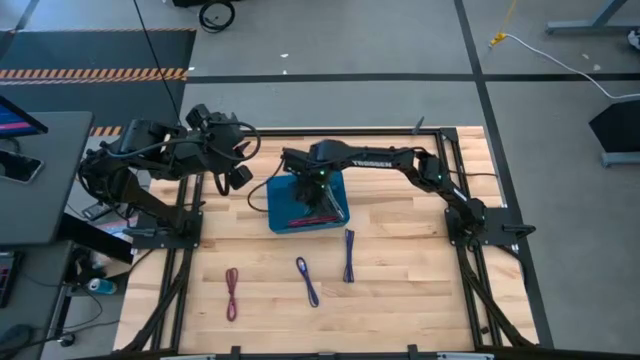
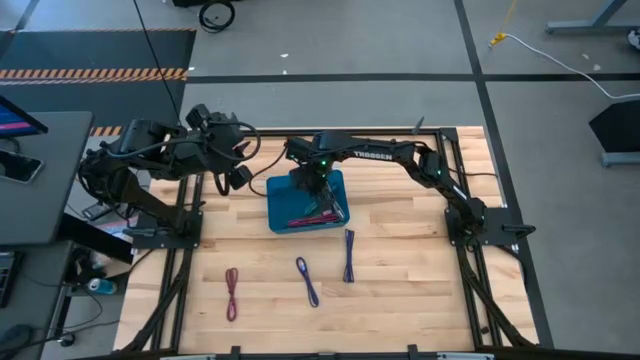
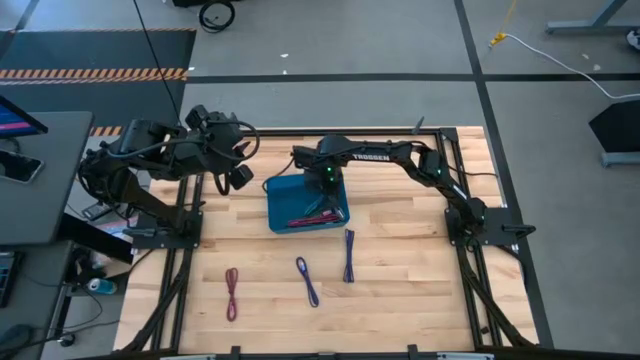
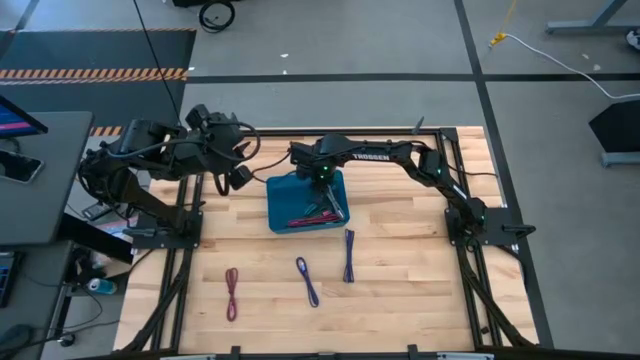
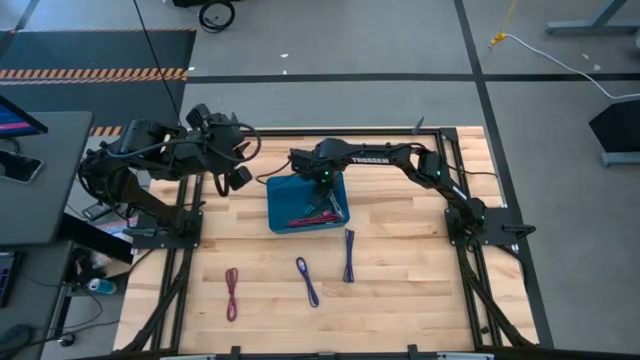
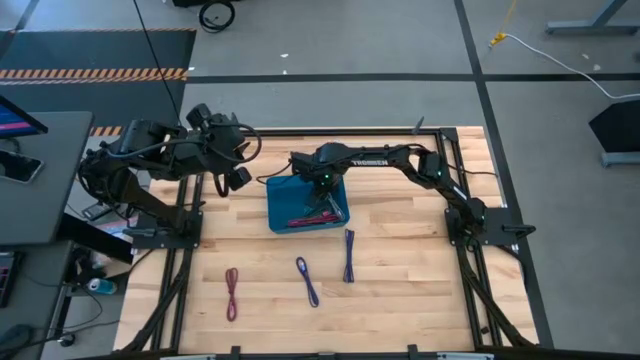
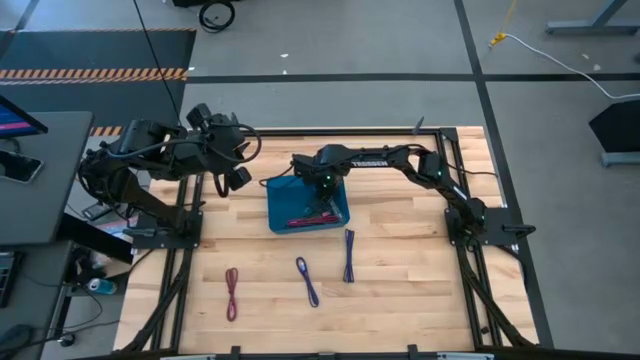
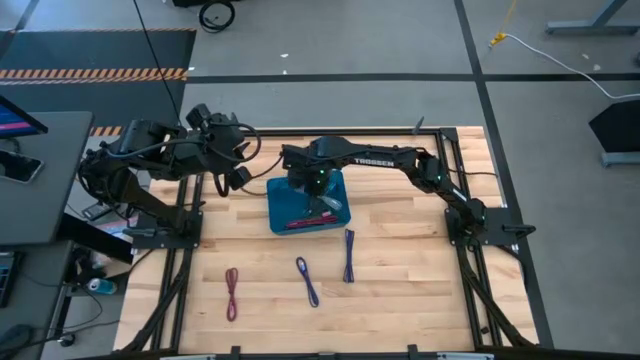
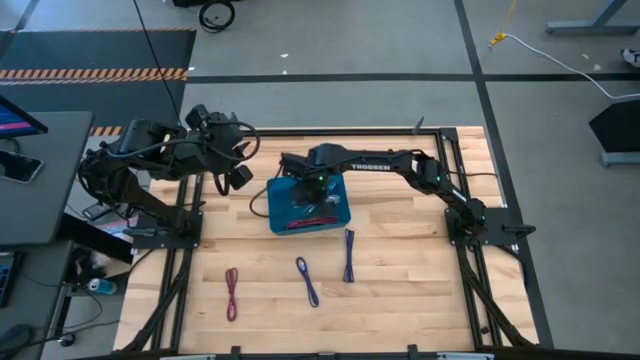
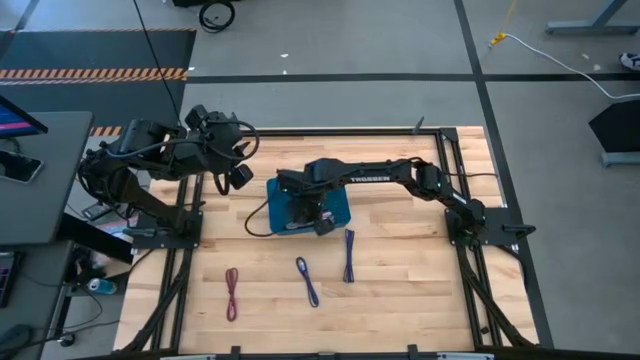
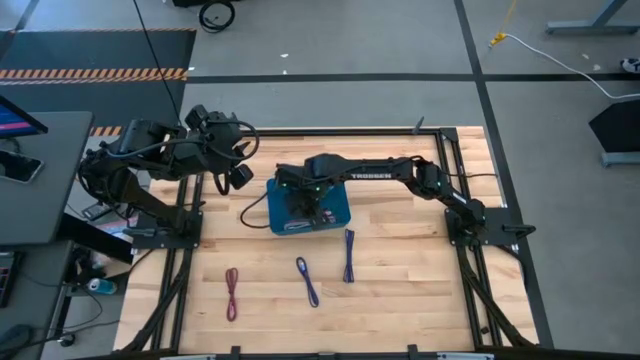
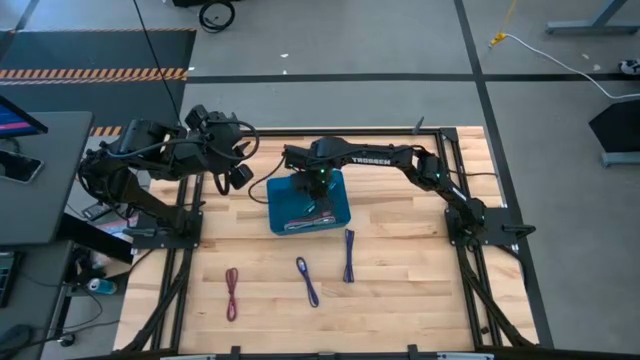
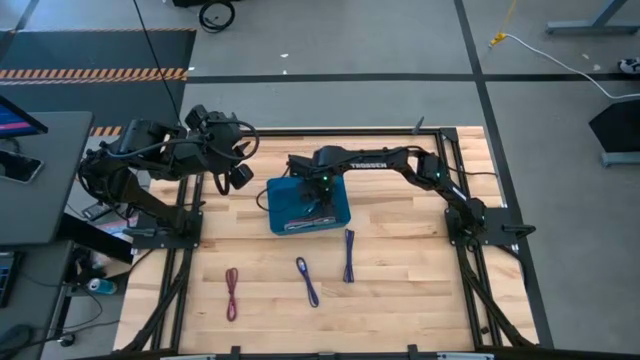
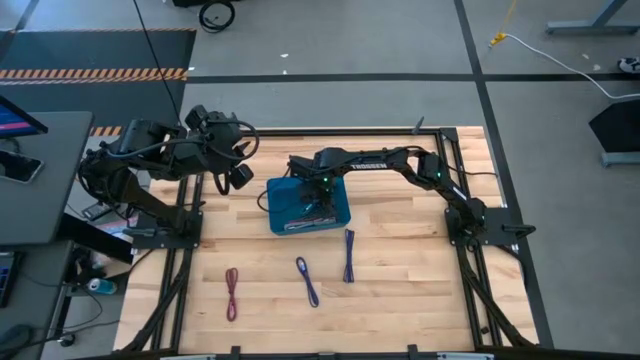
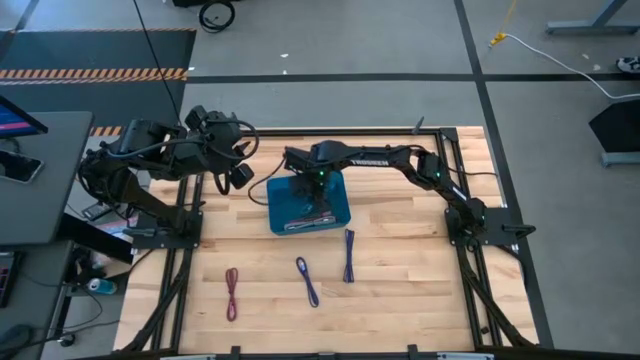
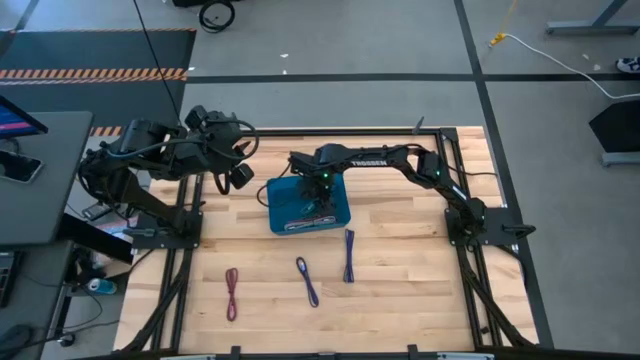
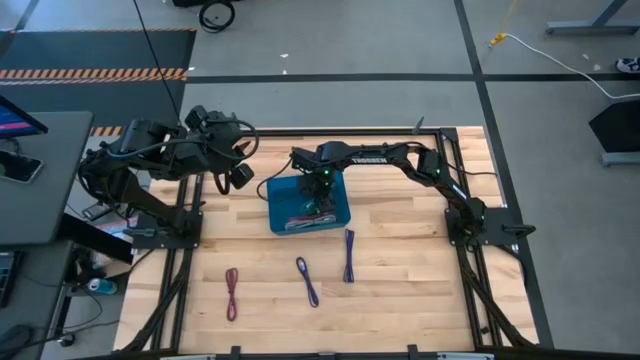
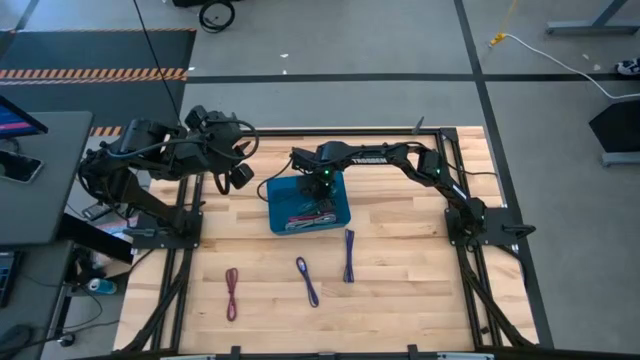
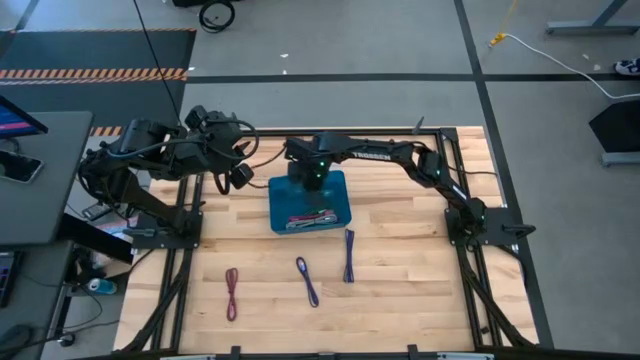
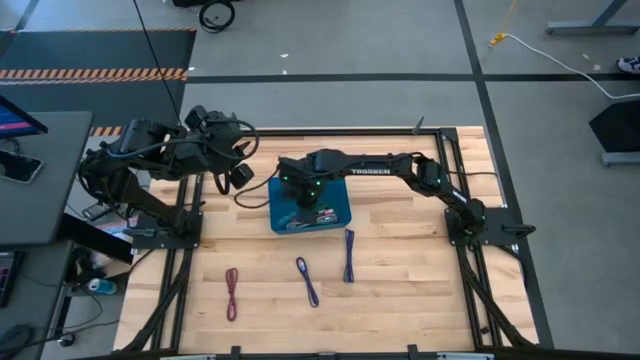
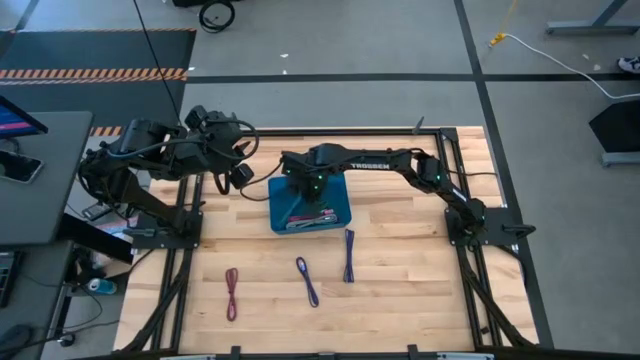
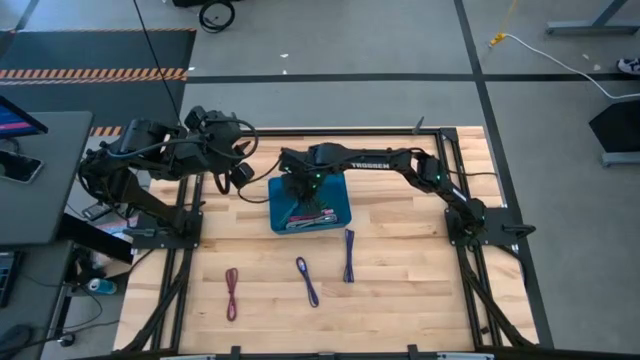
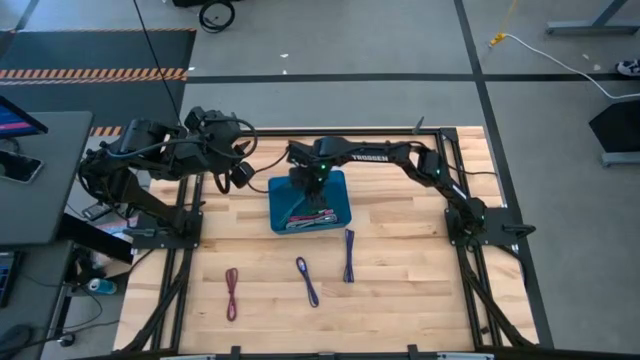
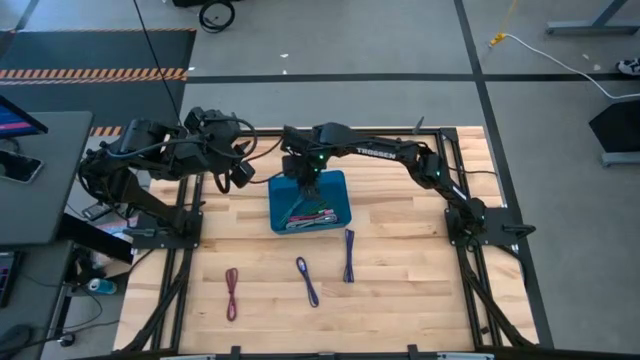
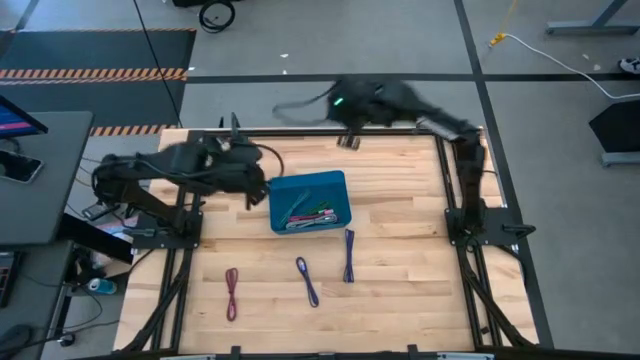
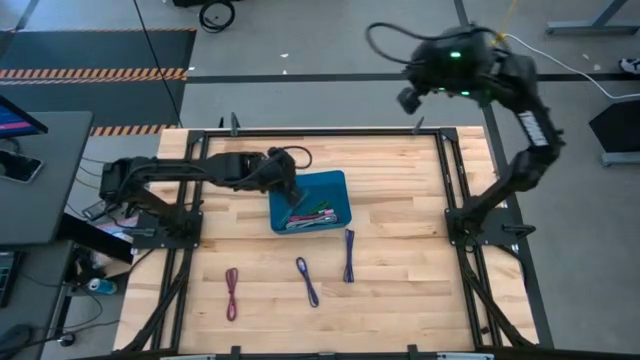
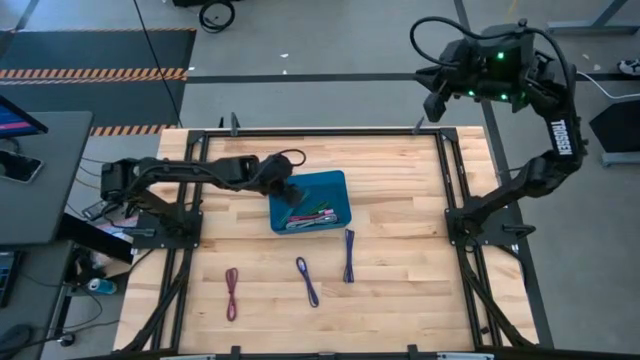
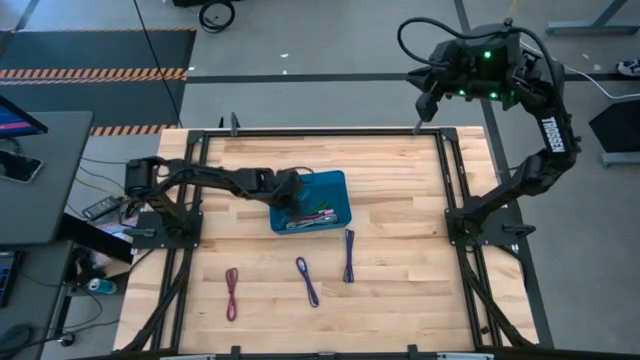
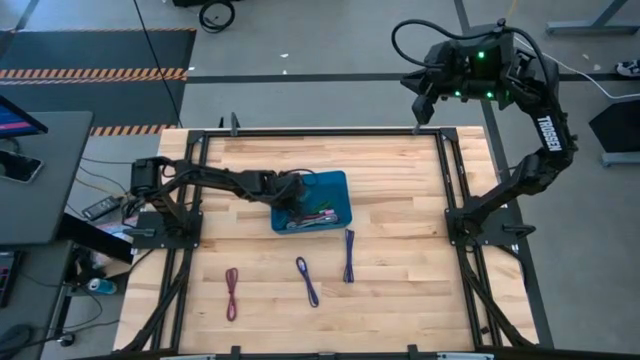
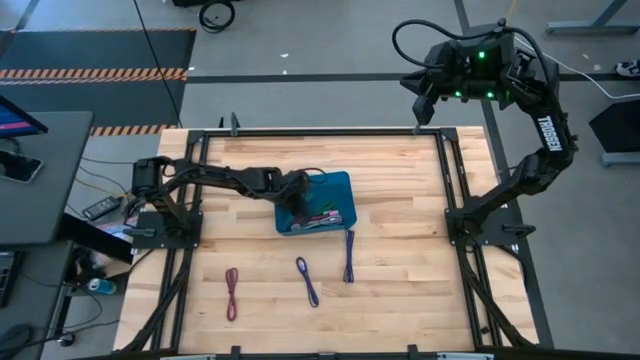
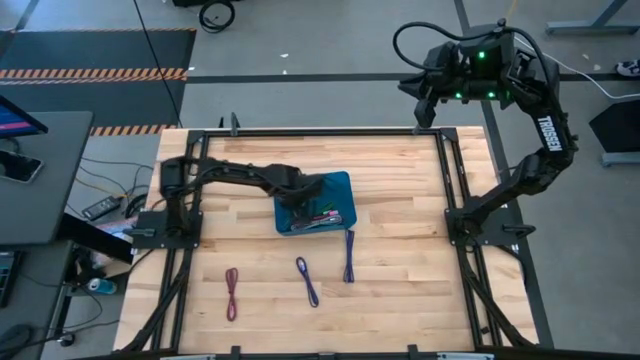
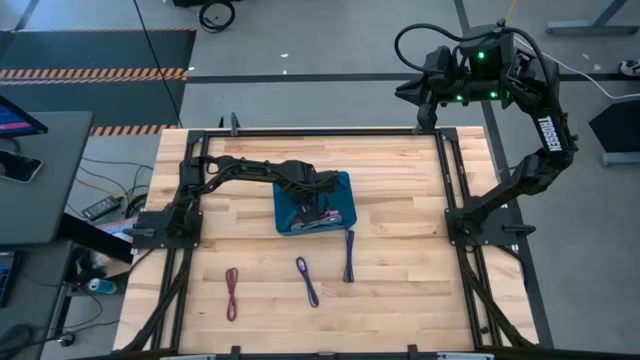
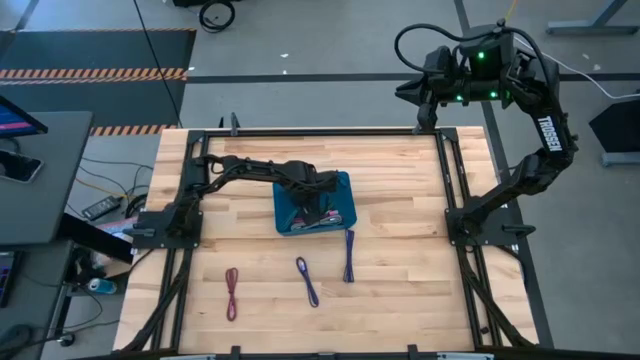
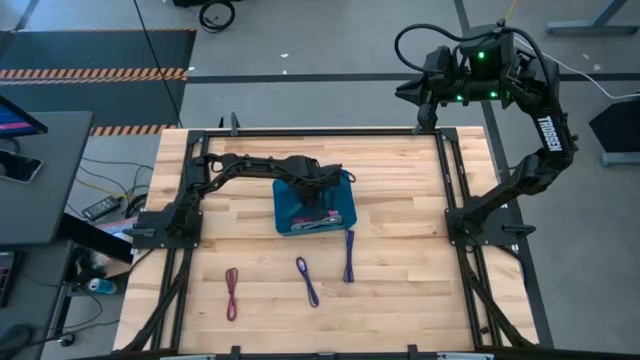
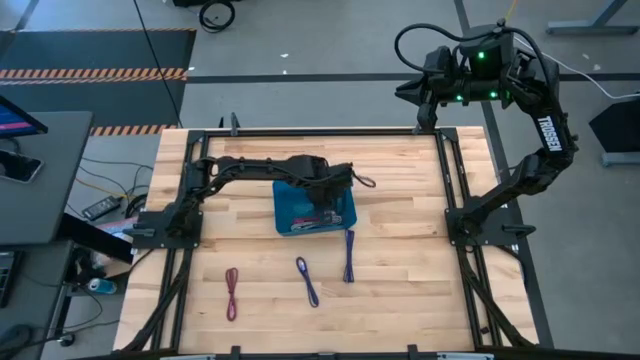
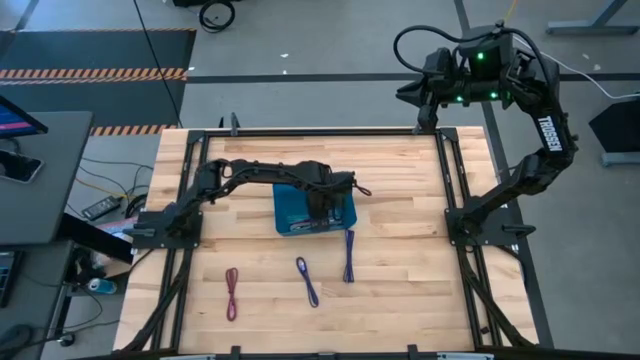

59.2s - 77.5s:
Task: Pick and place USB-C Cables
Adjust the charger cables in the blue bin
